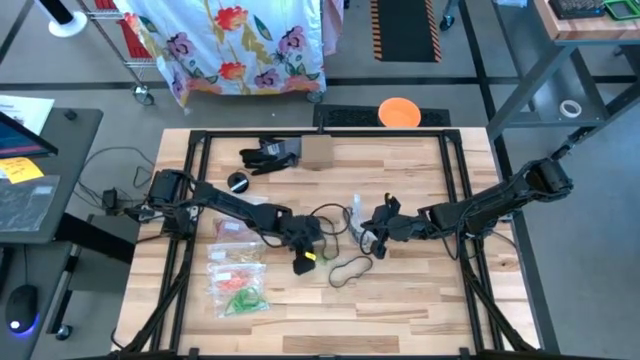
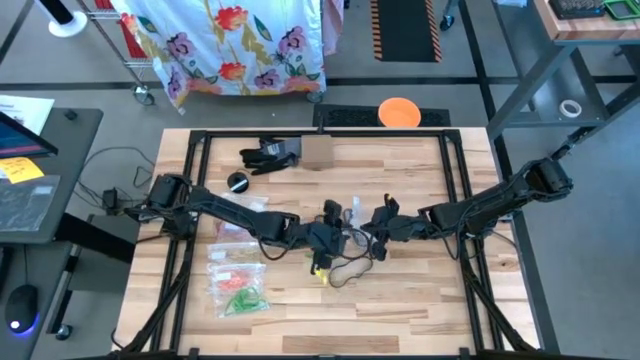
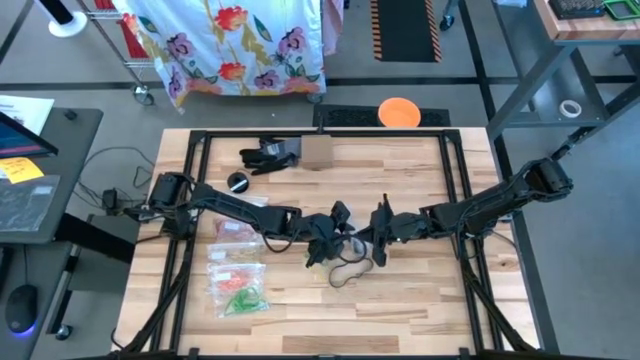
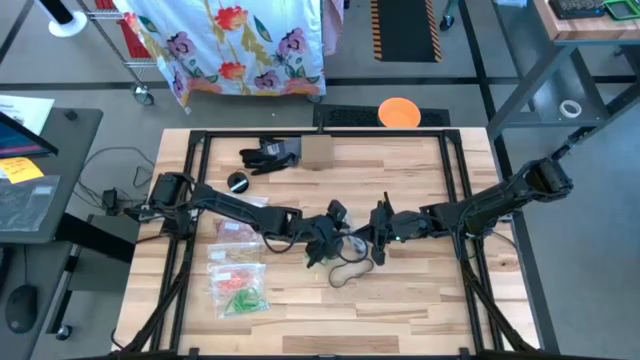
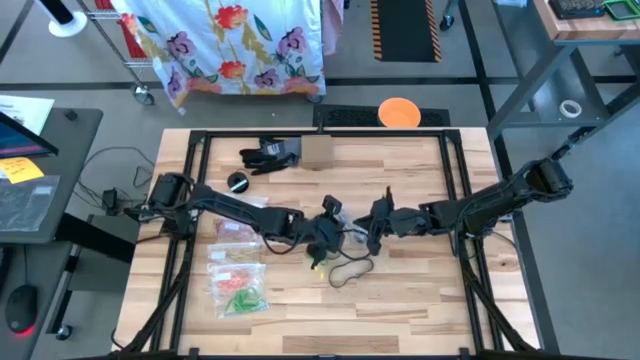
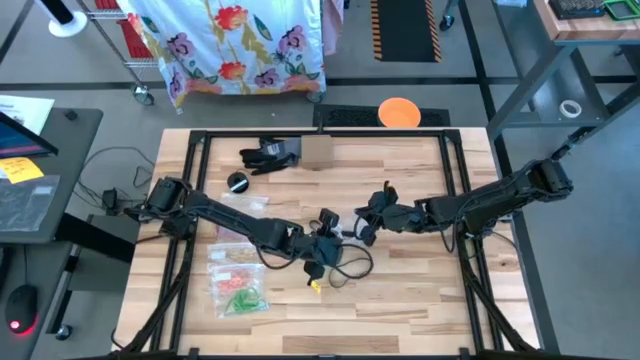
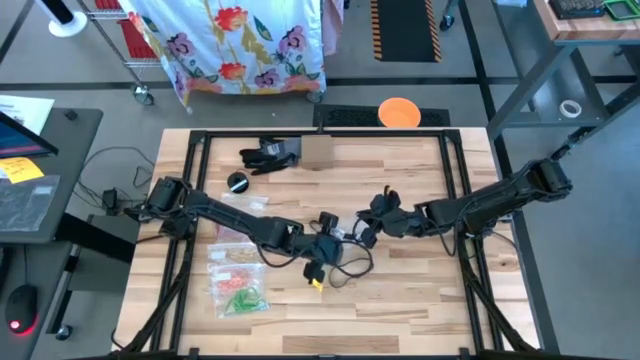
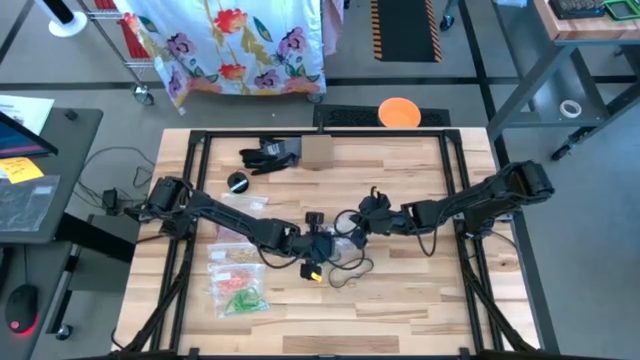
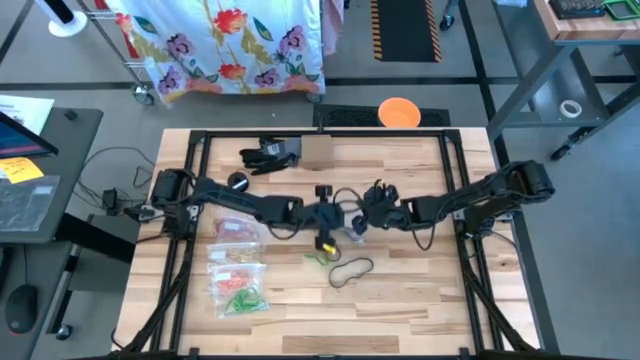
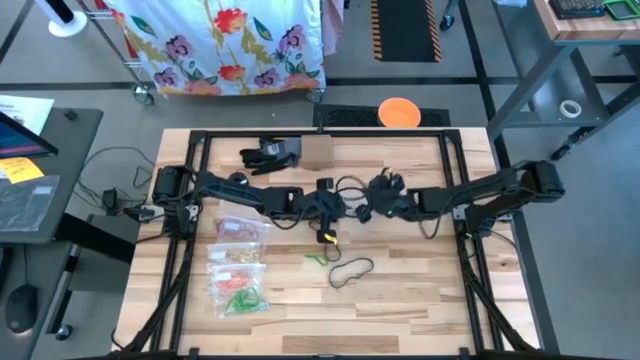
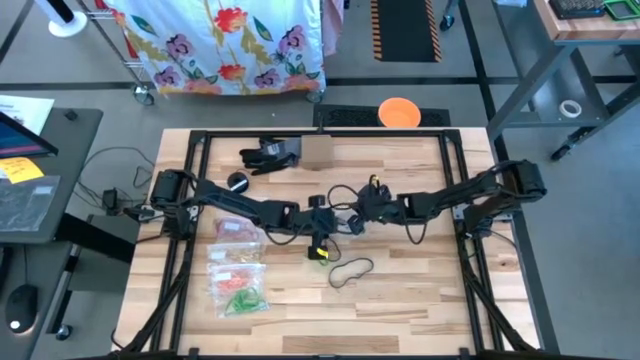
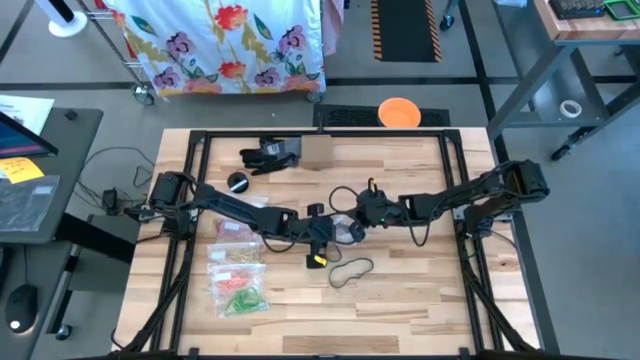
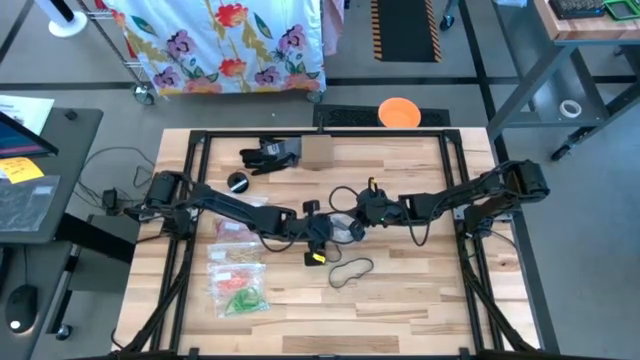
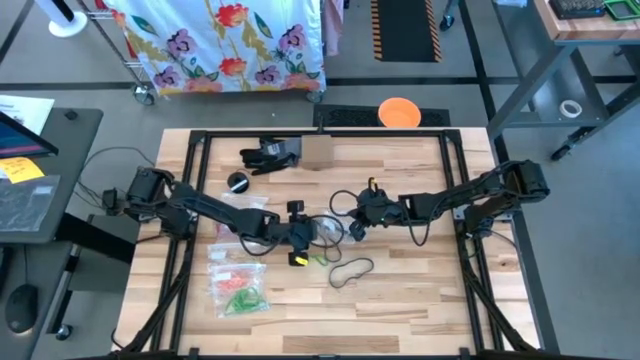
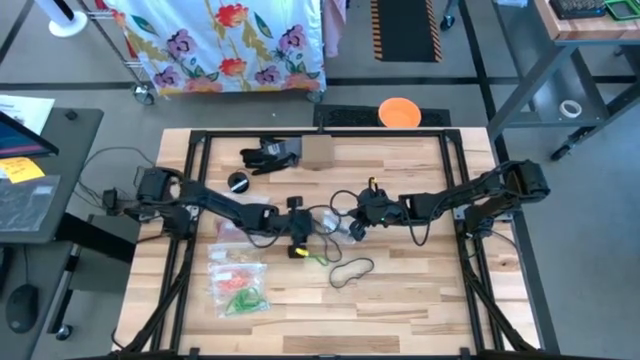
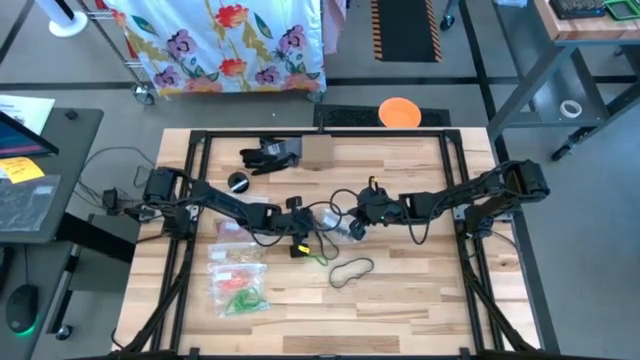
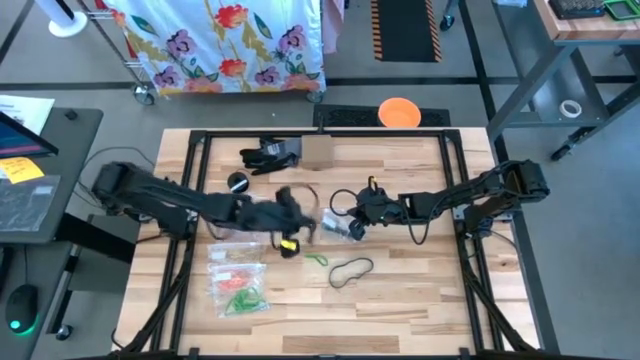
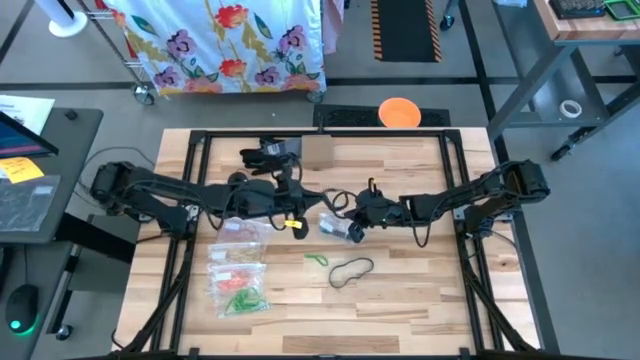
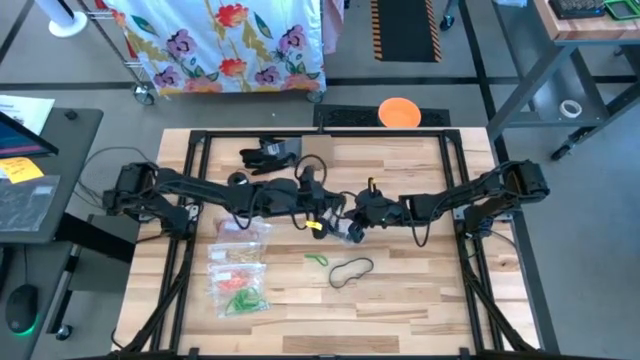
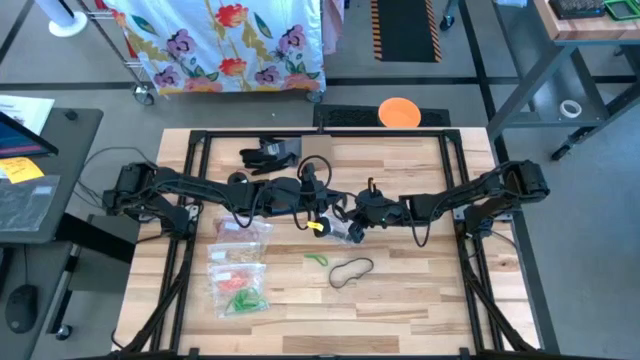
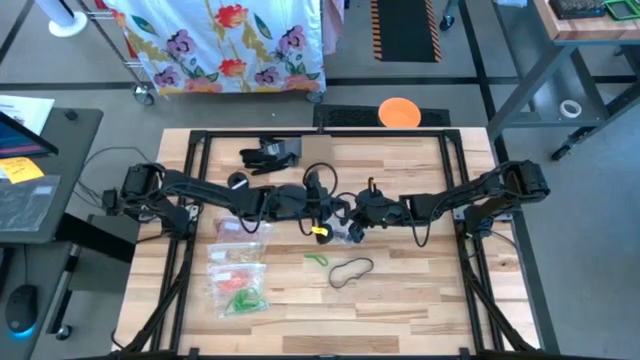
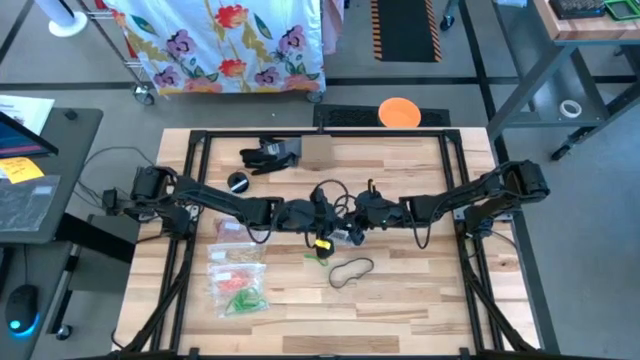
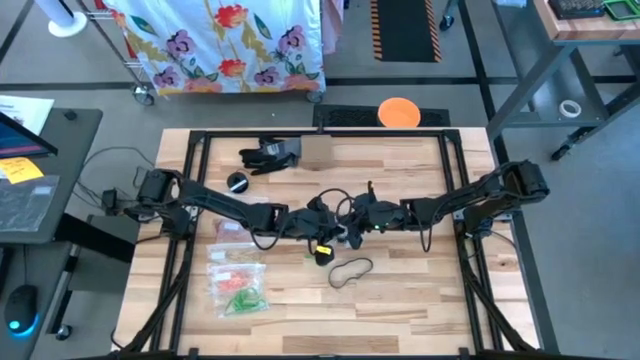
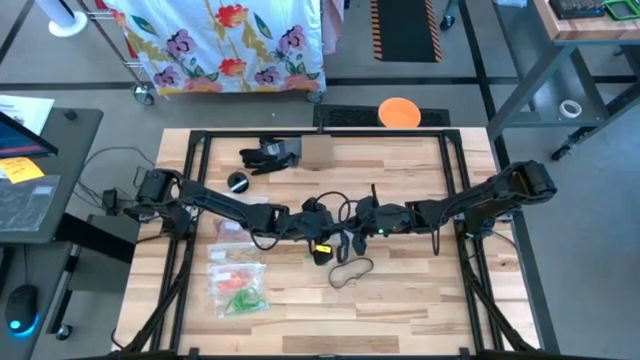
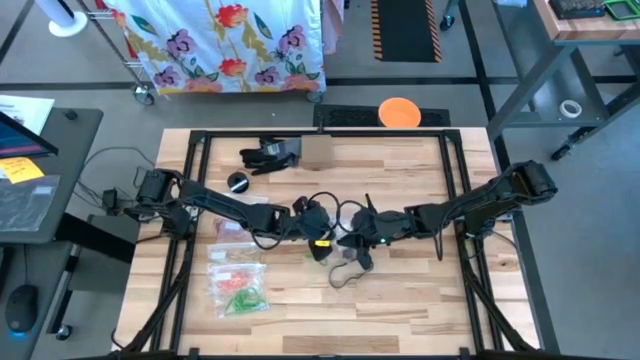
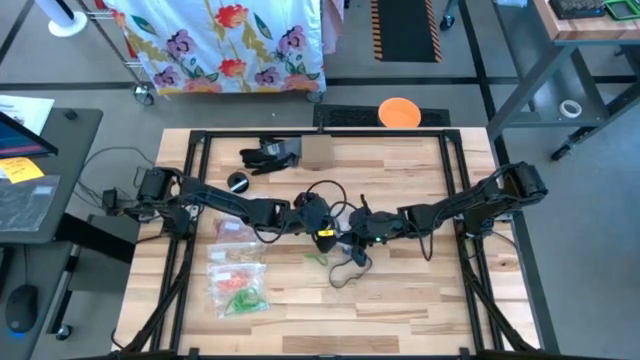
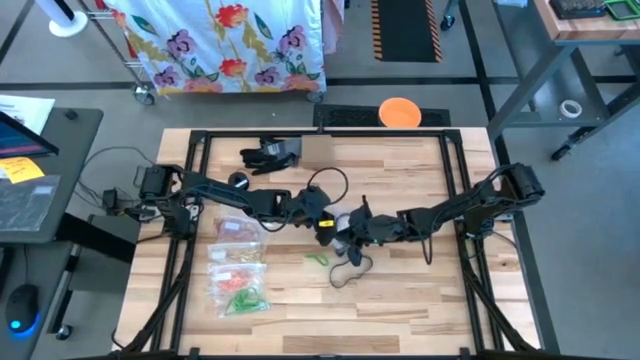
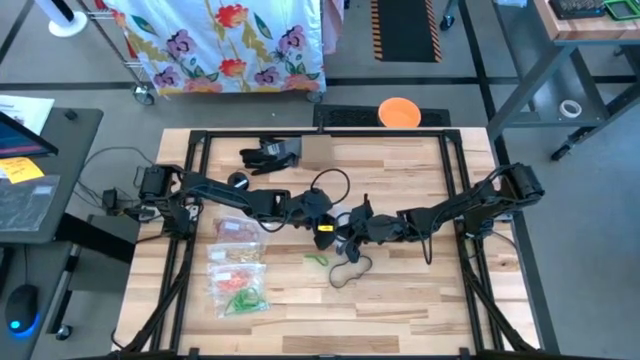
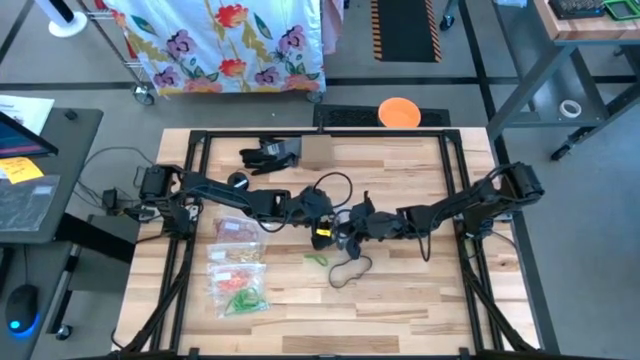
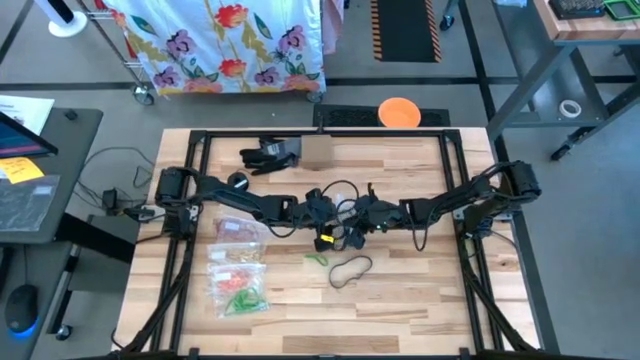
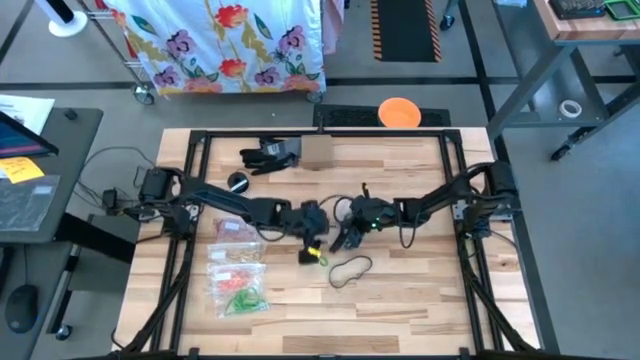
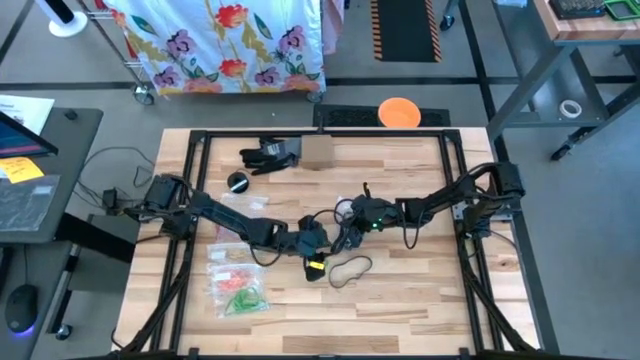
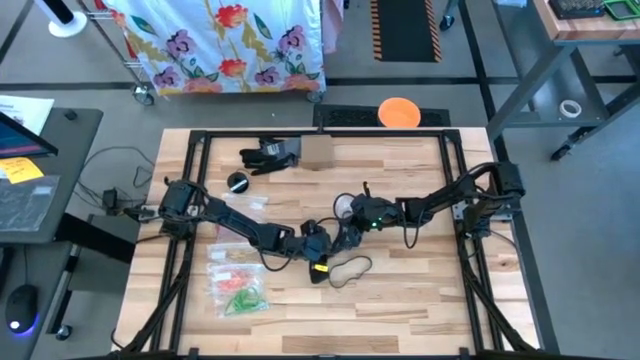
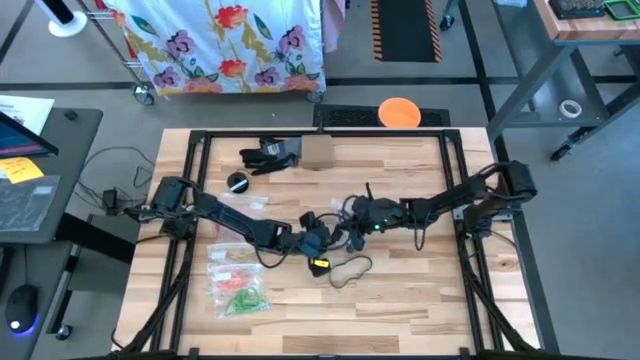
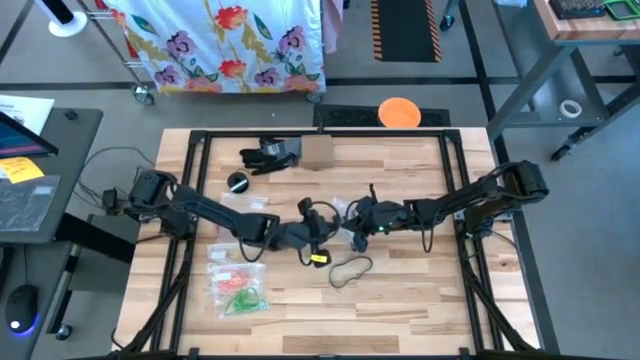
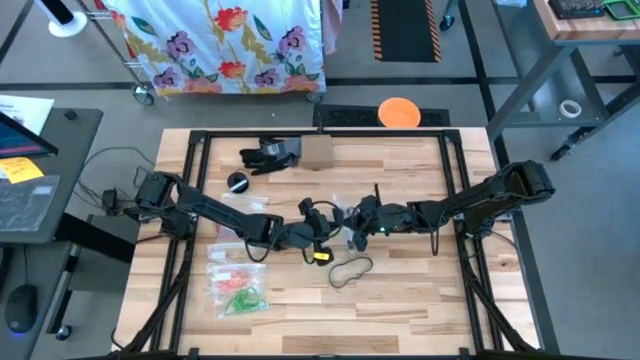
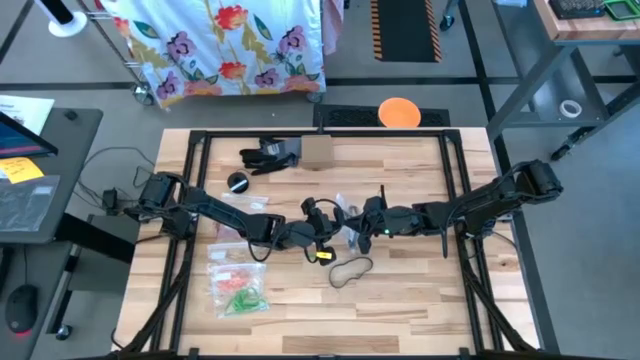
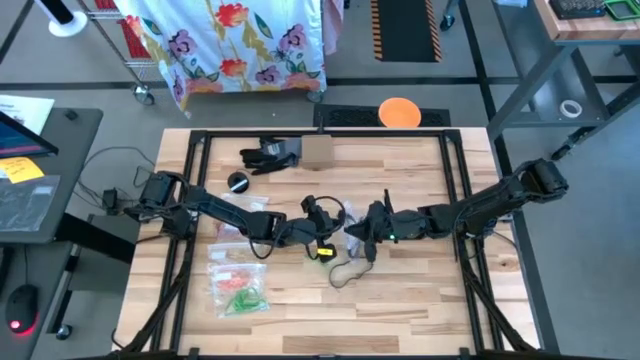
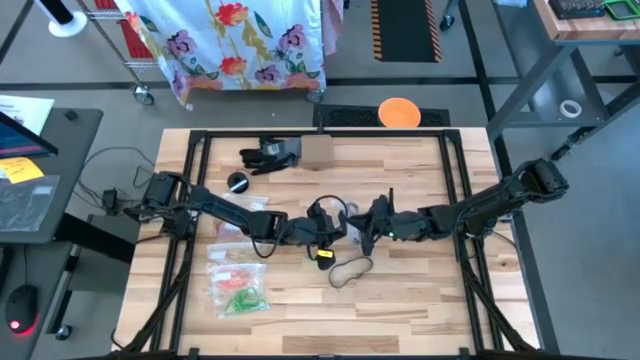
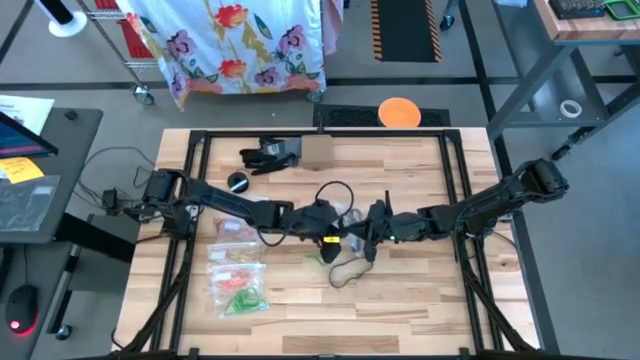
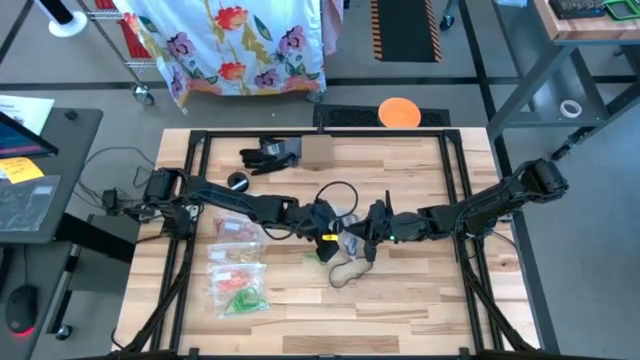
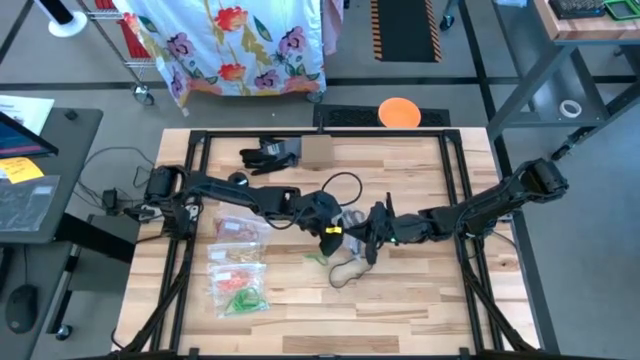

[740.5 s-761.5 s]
Task: Sort rubber bands
Put the black rubber band into the transparent zip bag
